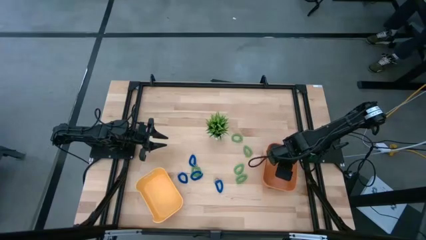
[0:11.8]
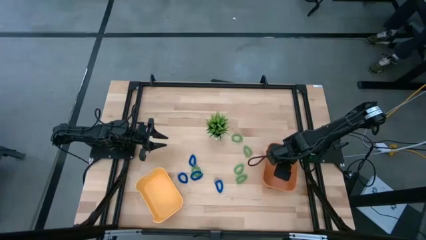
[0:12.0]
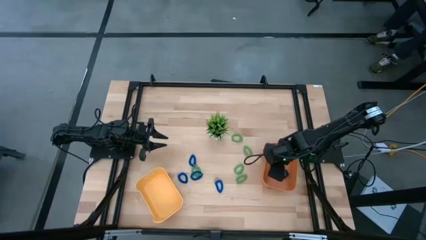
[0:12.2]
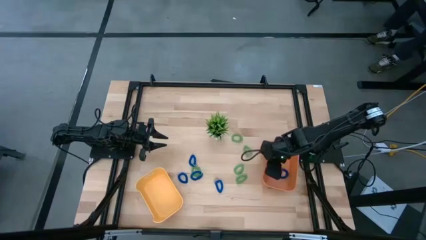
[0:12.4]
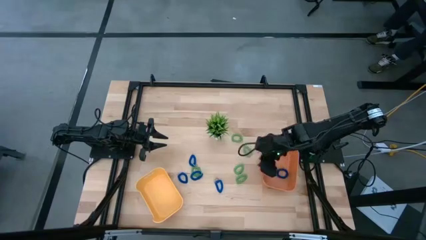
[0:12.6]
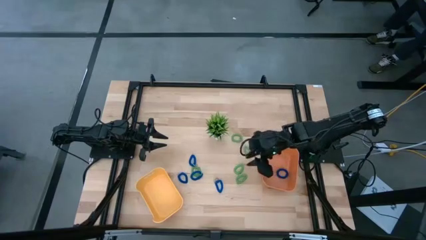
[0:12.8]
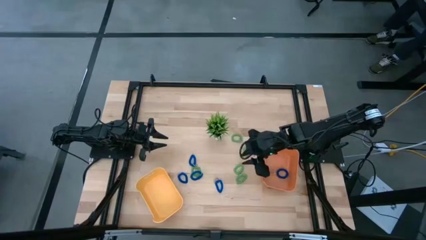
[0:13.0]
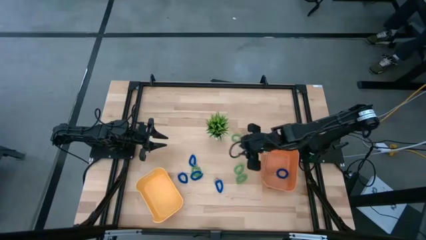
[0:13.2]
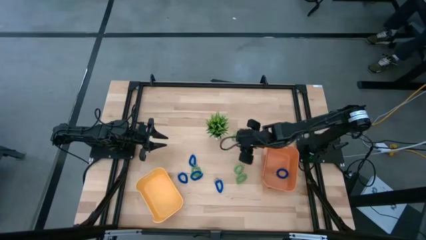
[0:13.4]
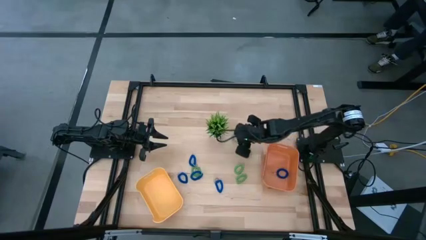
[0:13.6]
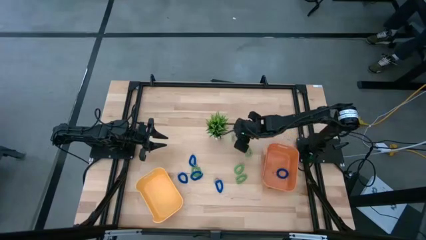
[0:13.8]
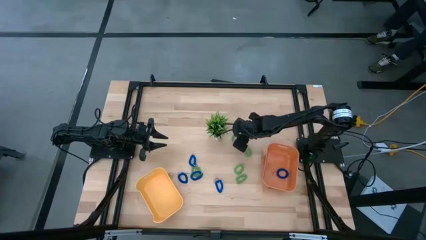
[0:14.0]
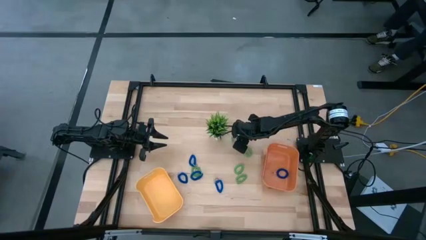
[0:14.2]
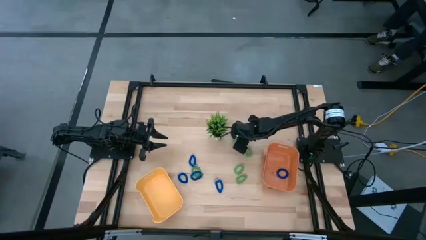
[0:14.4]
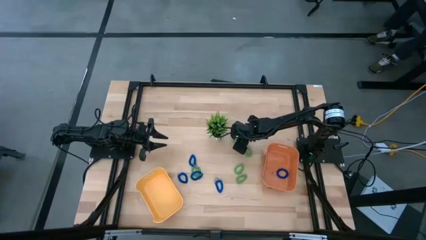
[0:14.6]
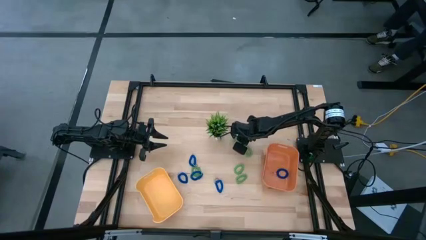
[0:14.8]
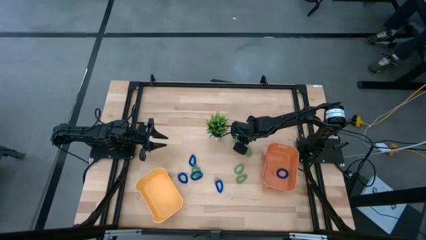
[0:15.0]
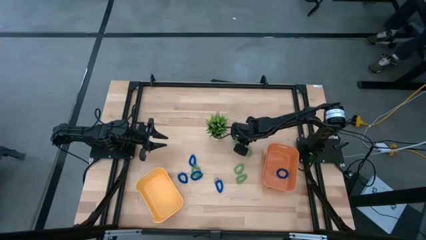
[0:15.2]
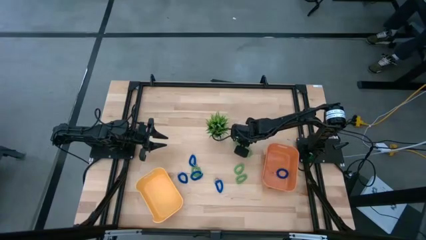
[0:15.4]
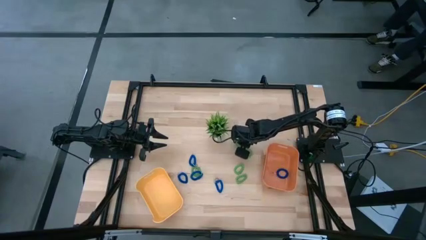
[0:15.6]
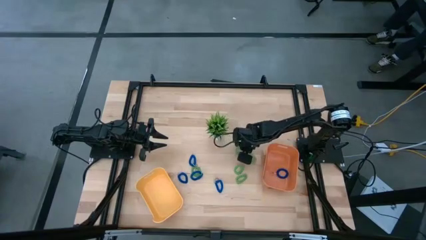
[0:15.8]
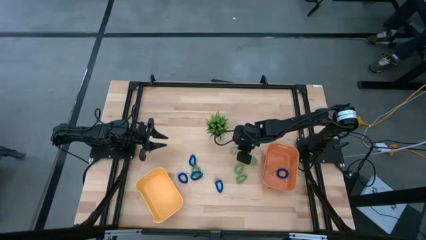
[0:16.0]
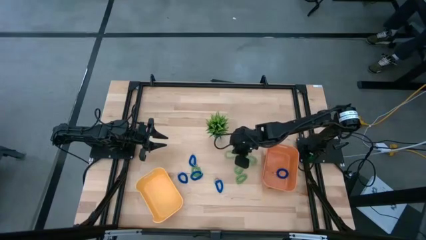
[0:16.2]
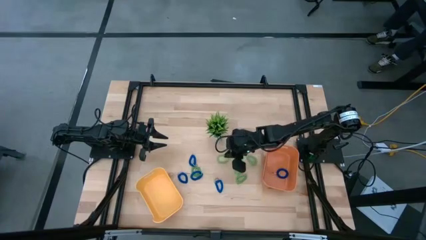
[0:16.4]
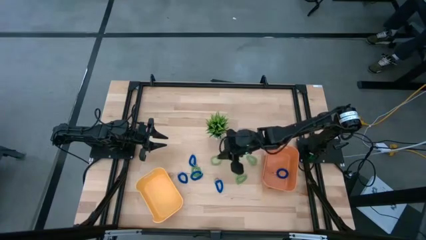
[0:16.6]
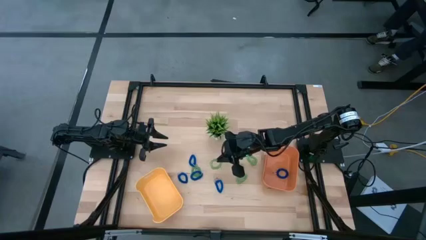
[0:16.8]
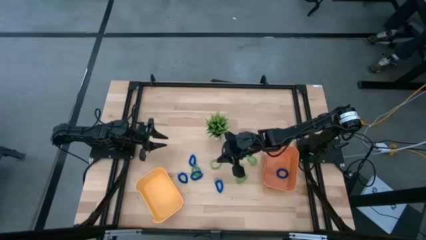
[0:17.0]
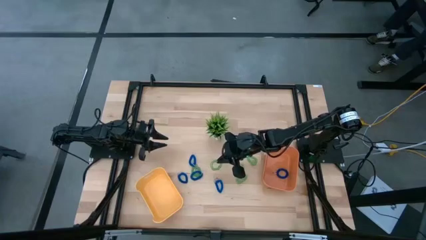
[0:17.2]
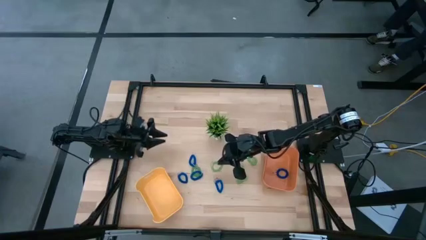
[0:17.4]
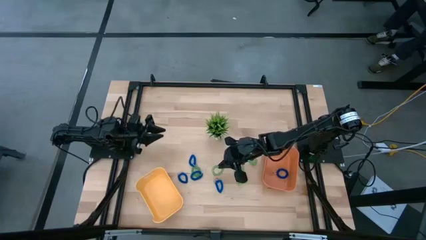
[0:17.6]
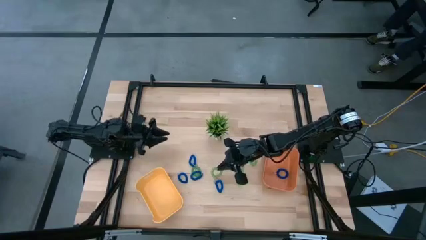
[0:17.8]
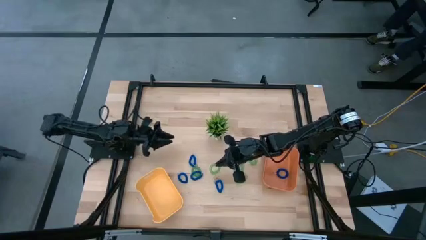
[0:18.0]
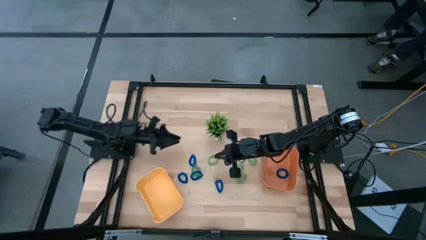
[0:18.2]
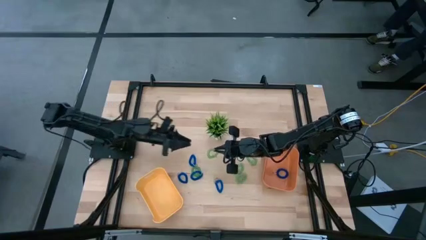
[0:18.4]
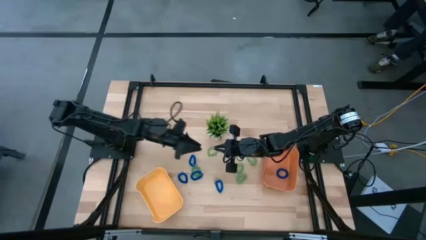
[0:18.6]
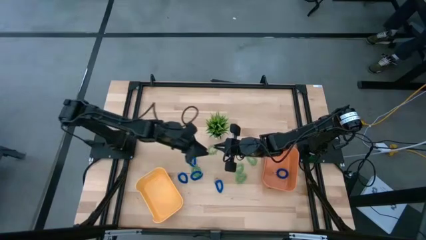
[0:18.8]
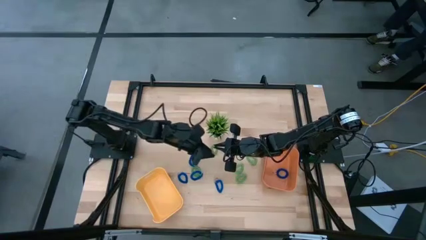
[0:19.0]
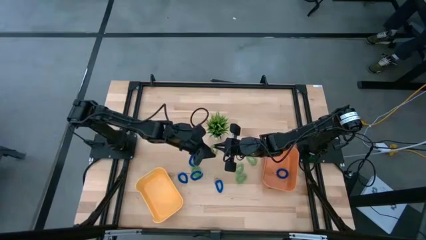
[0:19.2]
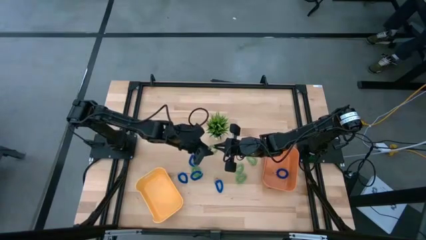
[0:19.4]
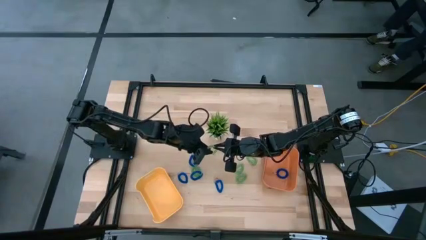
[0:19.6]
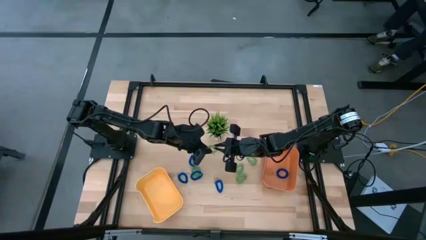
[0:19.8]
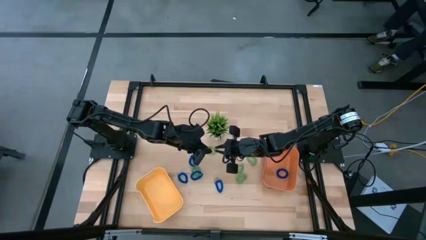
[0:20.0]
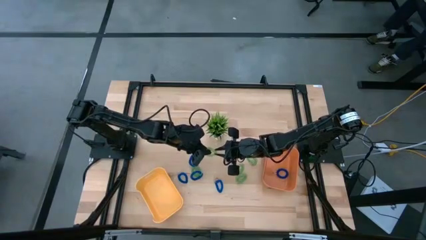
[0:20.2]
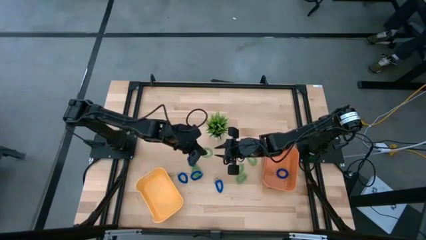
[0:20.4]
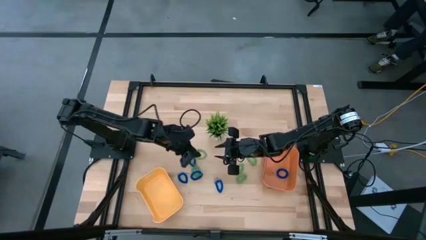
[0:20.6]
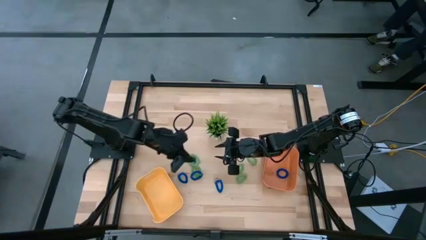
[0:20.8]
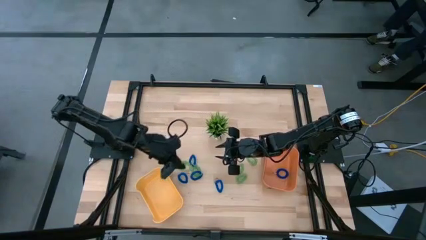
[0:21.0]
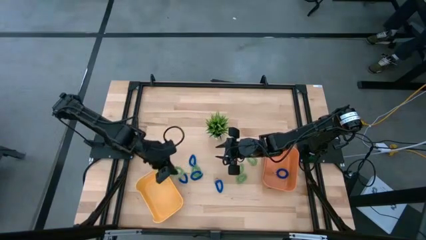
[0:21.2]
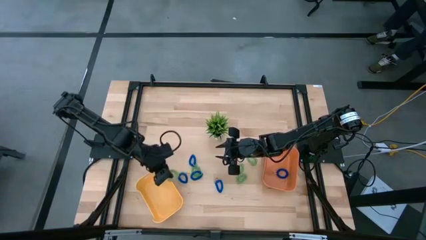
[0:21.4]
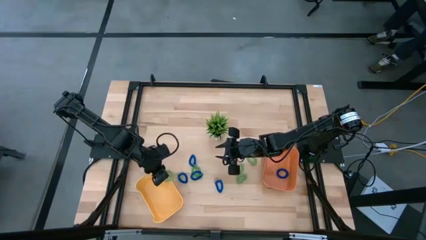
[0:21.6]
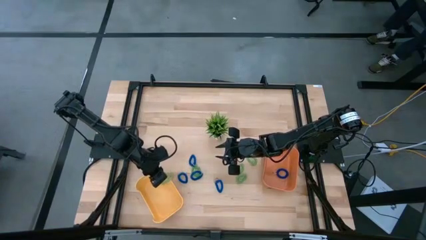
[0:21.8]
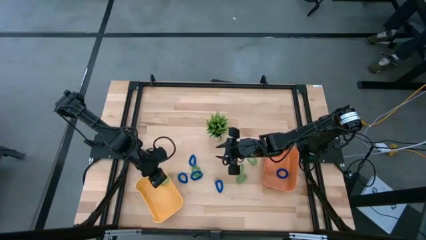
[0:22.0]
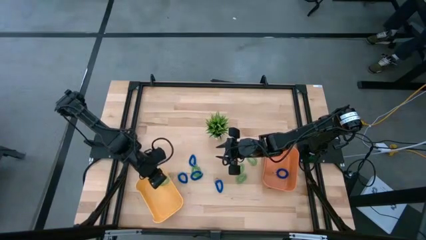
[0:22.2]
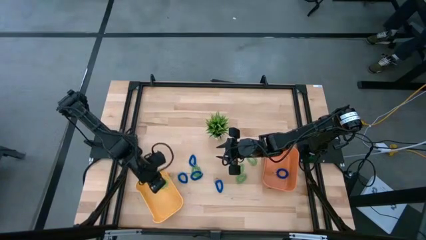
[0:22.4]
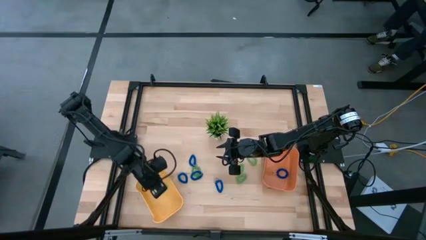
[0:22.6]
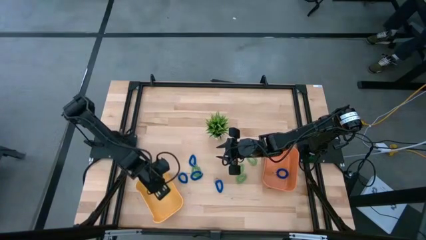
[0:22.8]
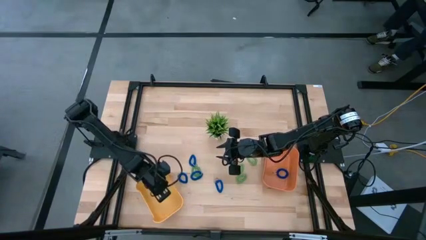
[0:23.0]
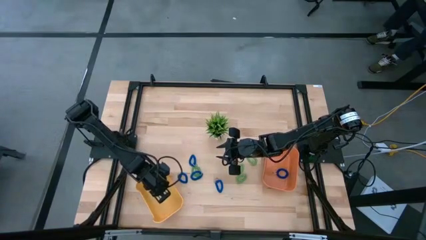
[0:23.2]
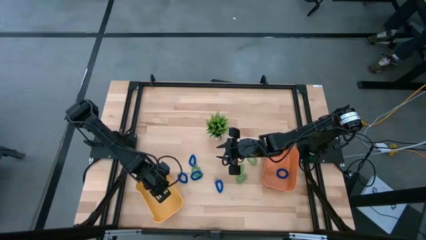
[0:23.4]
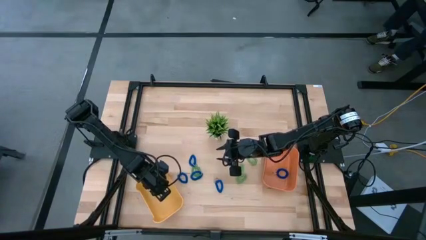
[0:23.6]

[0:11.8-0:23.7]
Task: Sort spring keychains
Put the green spring keychain into the yellow bin
